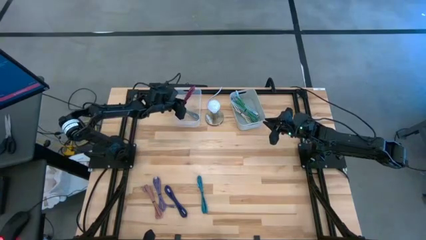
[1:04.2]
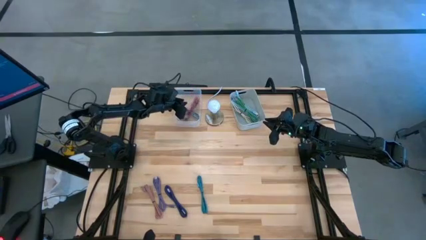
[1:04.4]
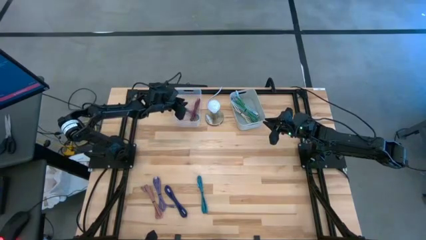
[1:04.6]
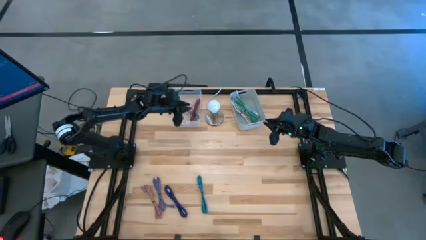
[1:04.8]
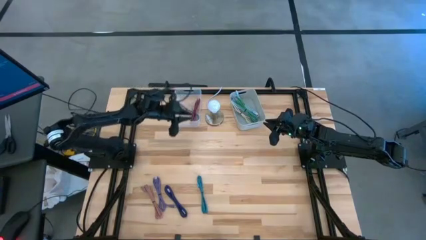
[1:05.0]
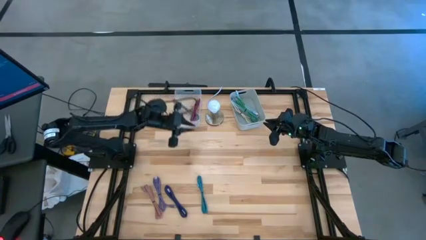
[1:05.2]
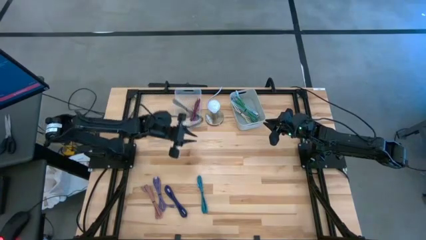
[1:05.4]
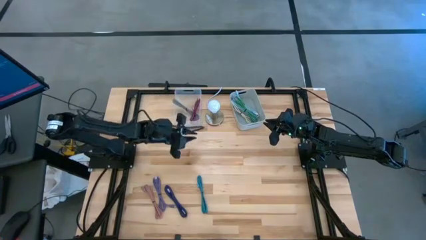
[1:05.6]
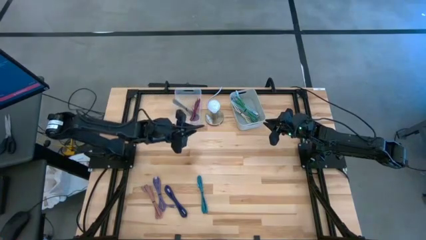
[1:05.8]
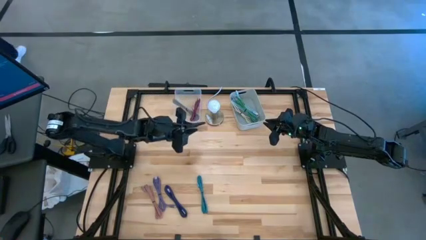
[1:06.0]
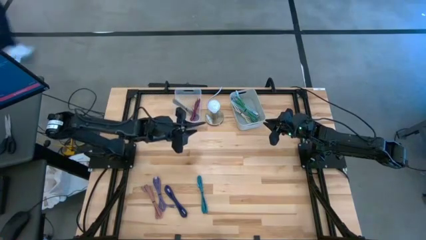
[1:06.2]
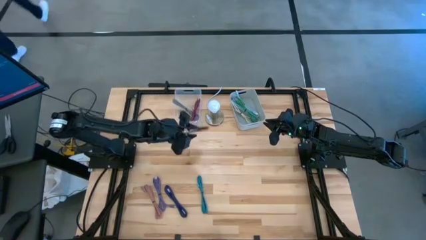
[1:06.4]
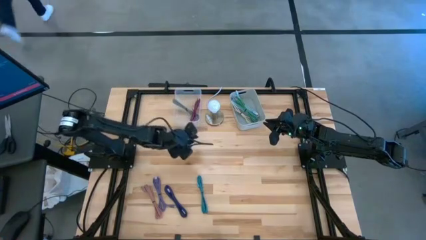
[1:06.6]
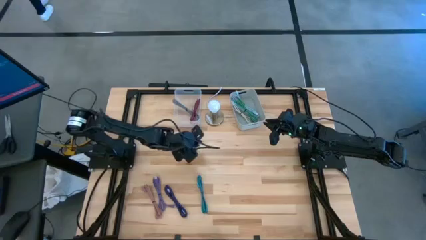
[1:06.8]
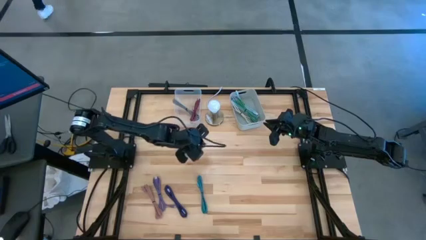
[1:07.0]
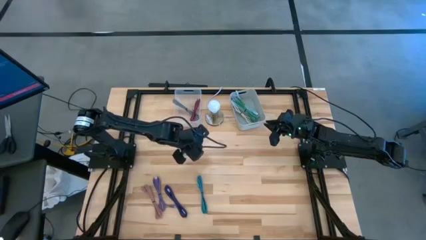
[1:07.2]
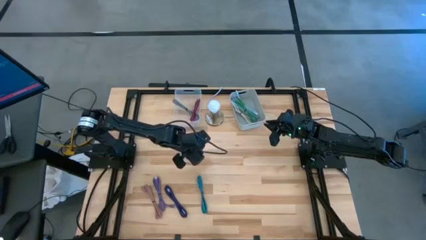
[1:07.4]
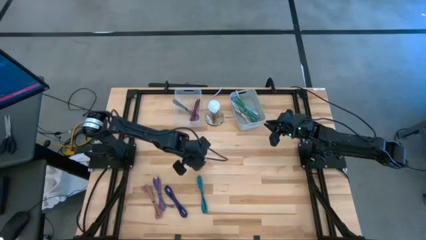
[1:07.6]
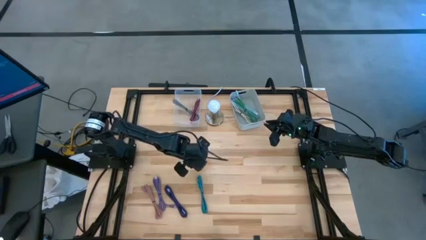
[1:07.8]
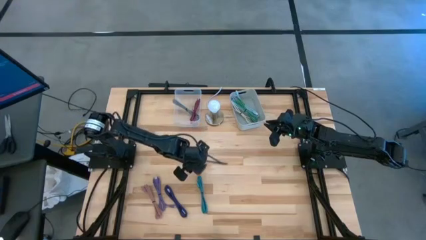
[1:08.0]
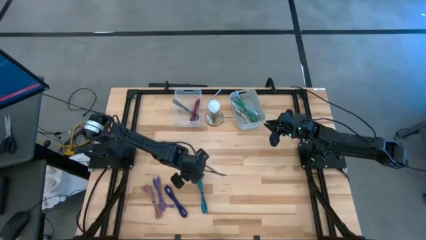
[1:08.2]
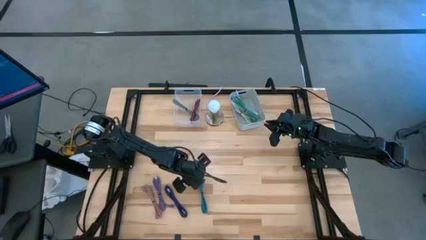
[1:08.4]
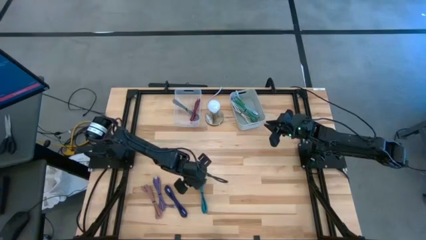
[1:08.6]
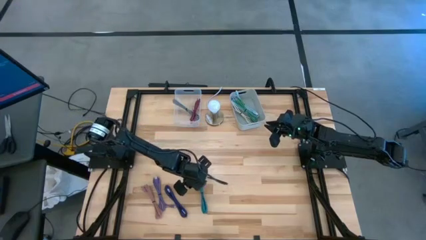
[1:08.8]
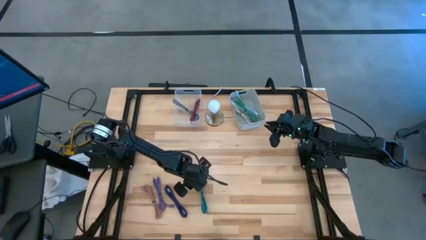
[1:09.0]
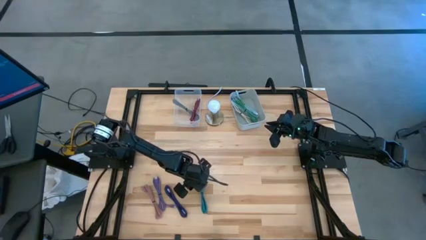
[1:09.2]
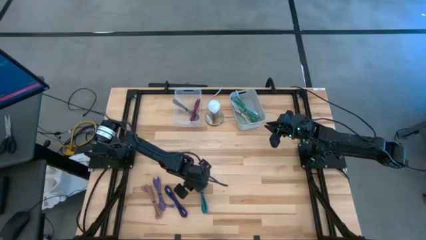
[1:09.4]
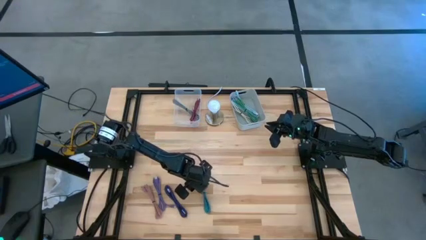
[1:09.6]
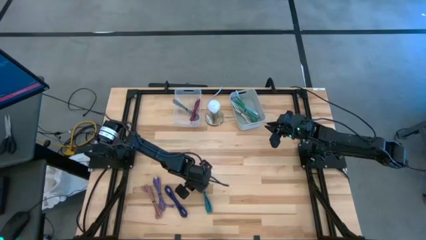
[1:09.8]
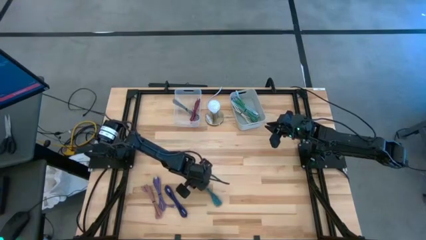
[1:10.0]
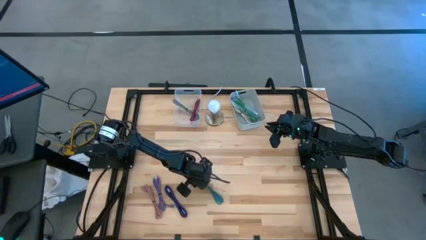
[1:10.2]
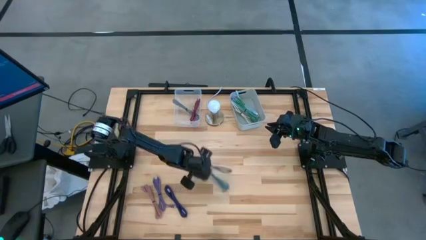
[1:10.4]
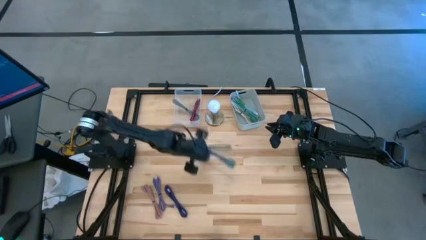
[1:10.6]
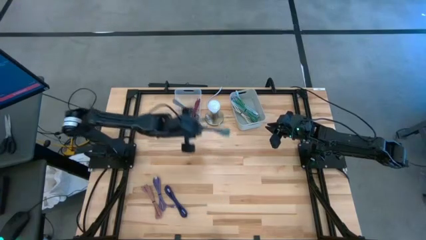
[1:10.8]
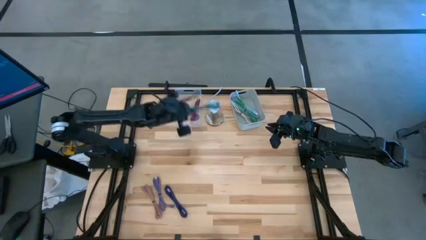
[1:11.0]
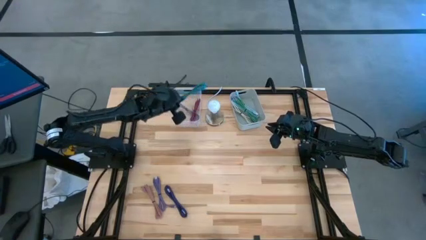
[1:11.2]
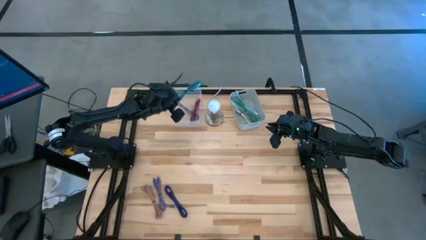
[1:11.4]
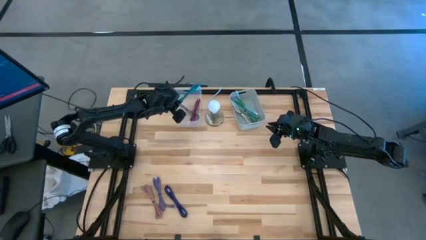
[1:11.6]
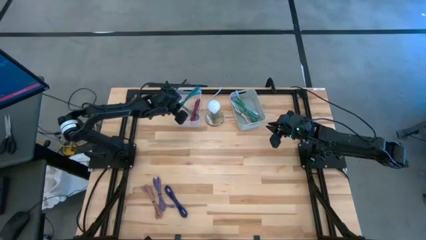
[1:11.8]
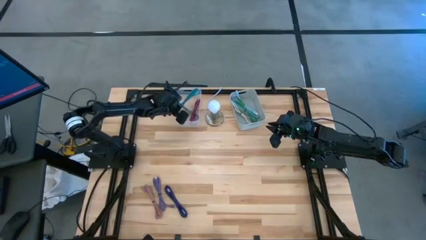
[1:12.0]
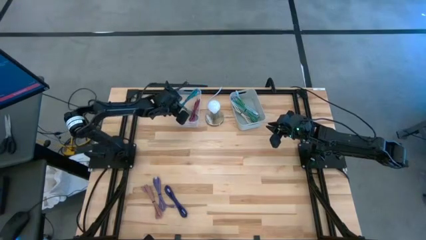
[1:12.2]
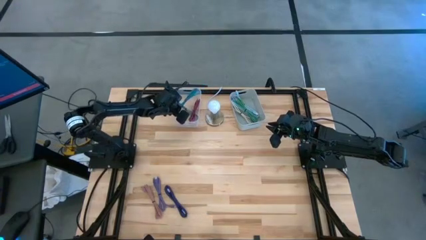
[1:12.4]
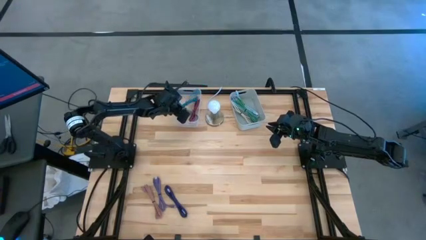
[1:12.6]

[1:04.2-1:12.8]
Task: Pick & Place USB Port
Put the blue black charger cable into the transparent bin

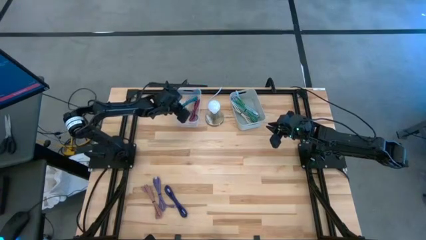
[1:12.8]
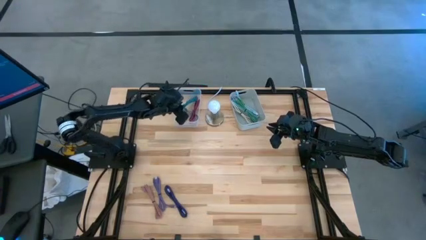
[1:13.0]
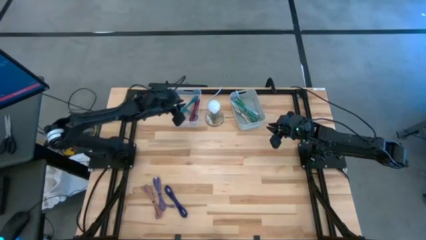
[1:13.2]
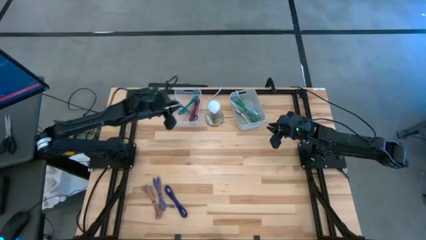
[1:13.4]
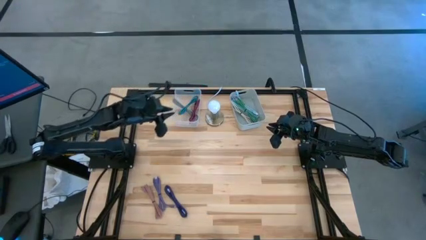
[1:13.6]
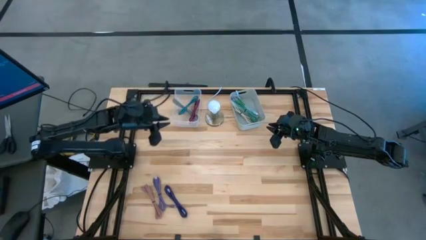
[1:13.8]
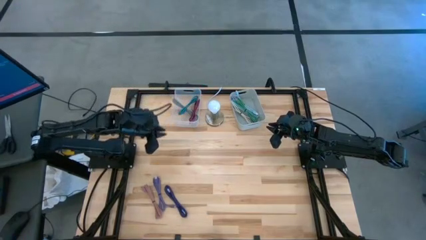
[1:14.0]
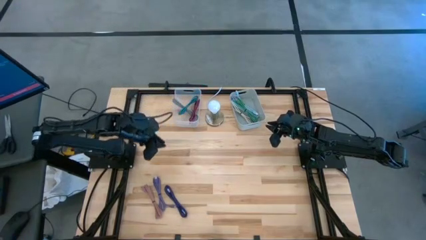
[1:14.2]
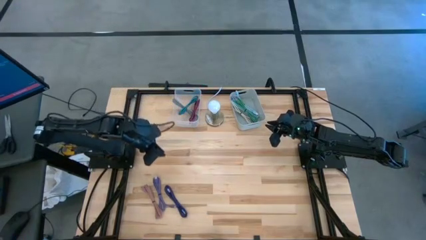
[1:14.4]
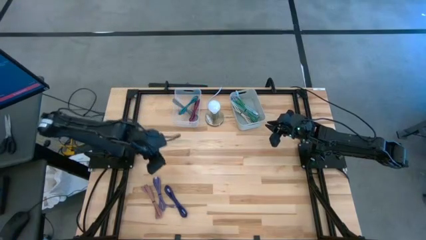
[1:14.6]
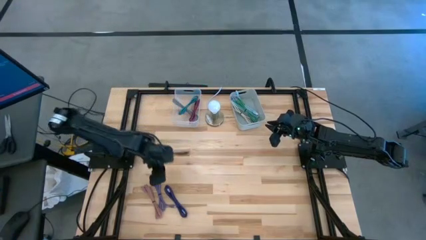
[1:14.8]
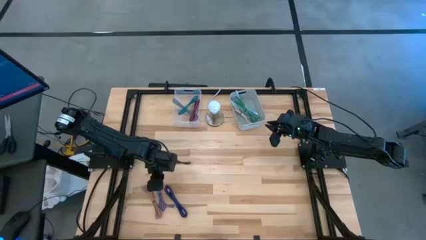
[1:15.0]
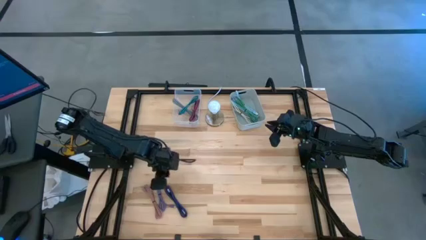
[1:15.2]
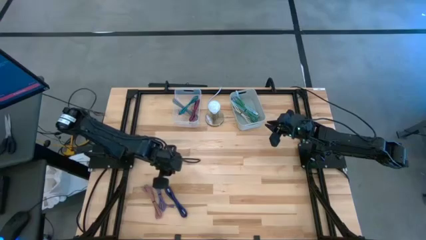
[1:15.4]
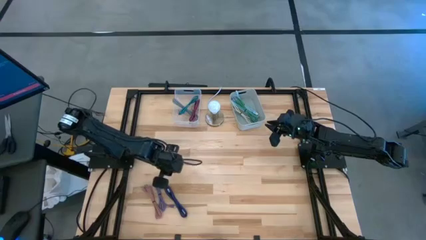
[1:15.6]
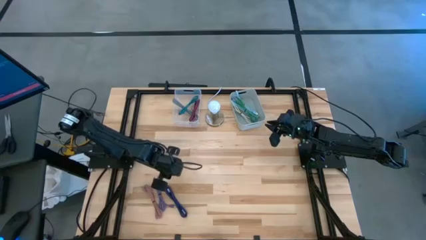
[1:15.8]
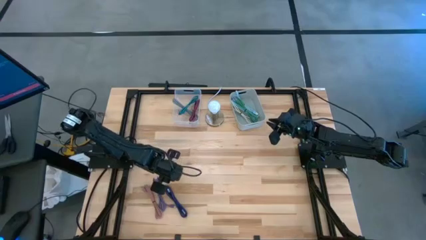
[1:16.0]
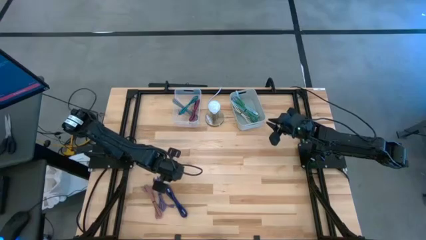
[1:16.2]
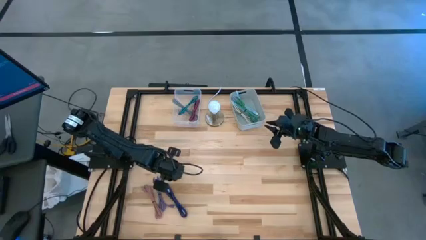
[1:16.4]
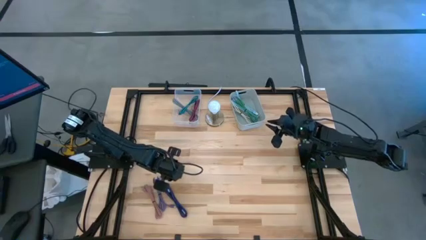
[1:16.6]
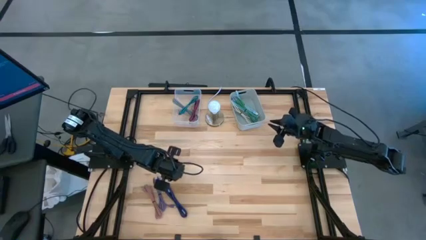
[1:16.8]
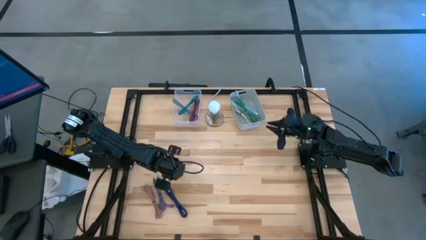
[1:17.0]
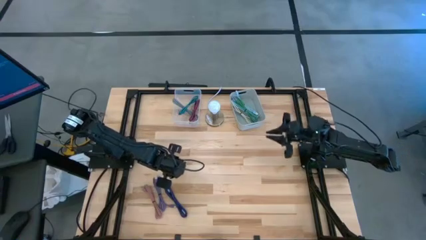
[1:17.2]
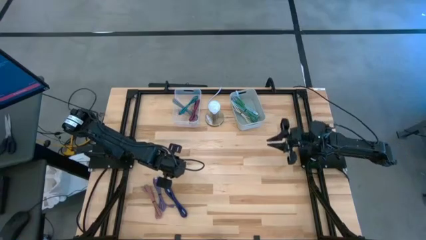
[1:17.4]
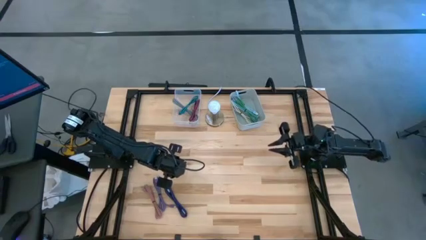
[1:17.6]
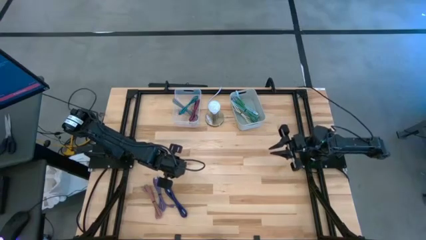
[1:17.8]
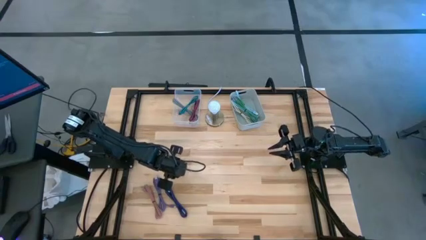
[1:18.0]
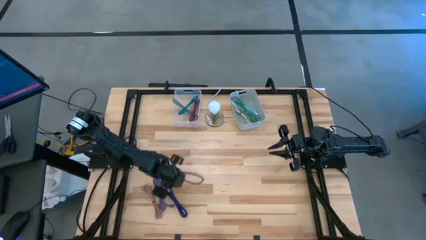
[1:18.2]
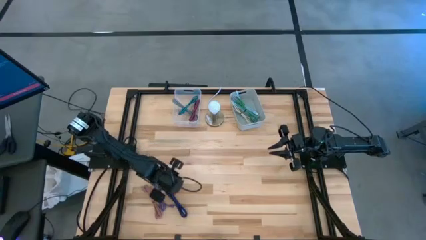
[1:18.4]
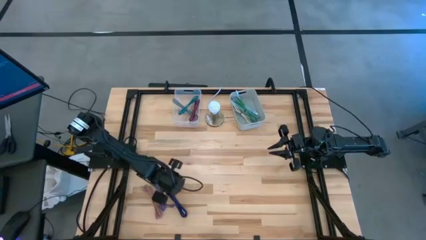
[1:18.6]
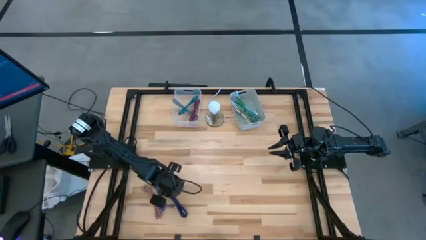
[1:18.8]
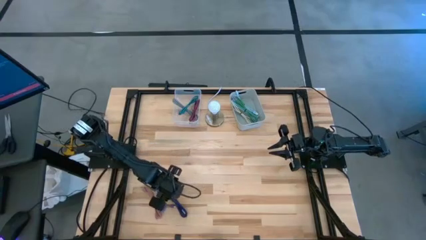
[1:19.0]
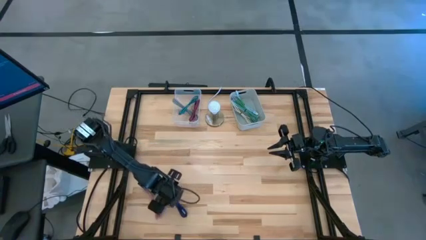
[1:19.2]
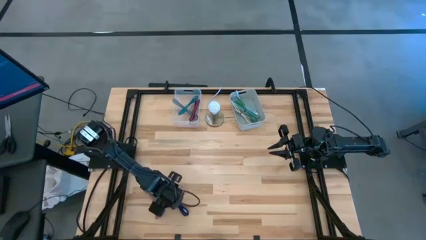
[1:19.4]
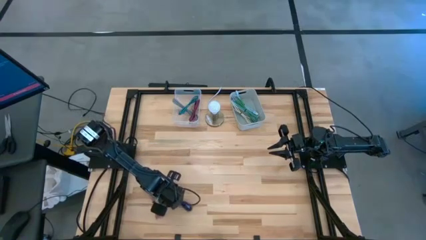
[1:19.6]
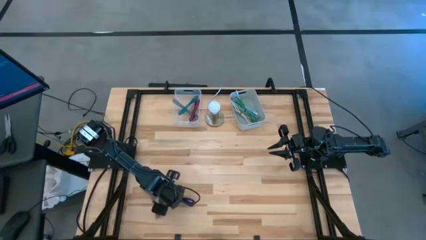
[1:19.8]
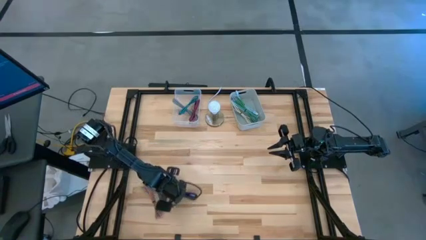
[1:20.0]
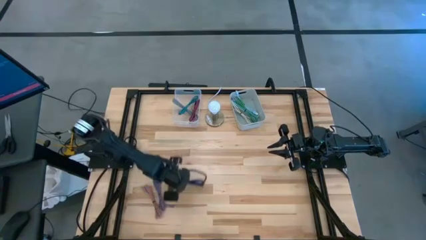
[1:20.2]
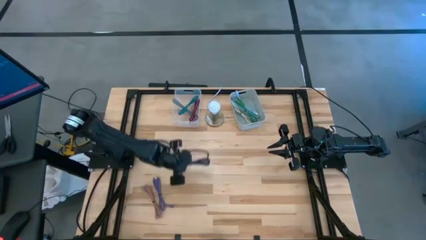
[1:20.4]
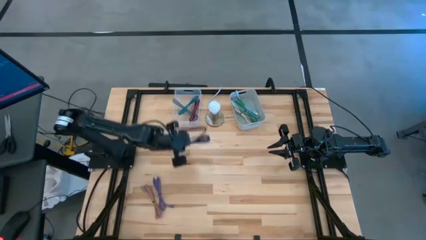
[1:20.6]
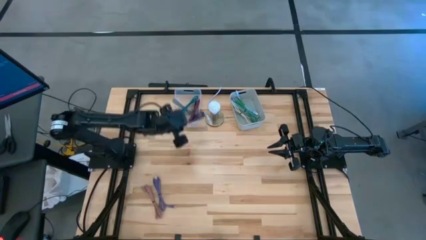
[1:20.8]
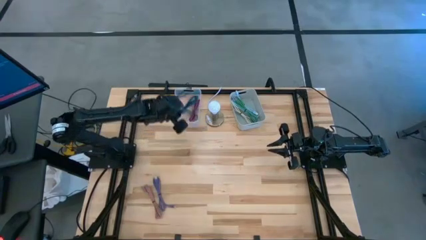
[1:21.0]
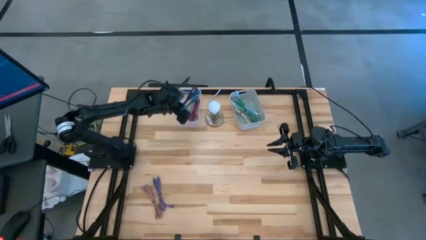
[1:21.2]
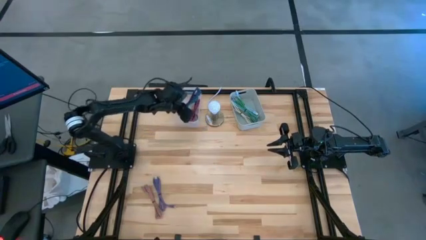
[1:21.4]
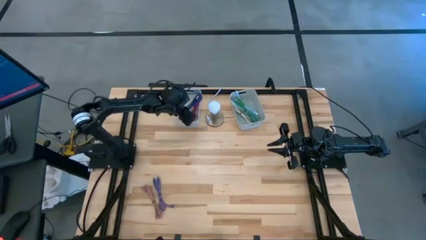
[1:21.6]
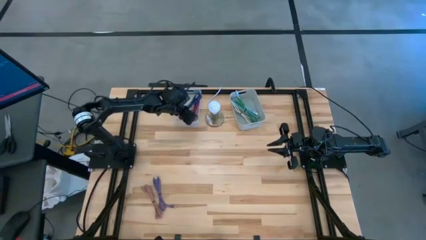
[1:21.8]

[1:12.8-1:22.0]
Put the purple black charger cable into the transparent bin
